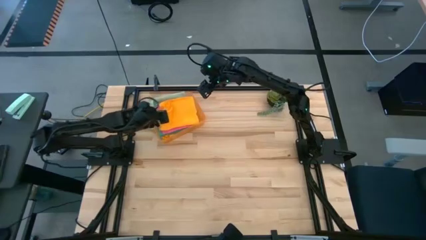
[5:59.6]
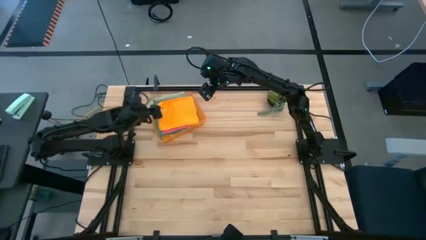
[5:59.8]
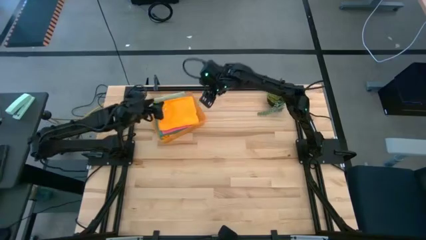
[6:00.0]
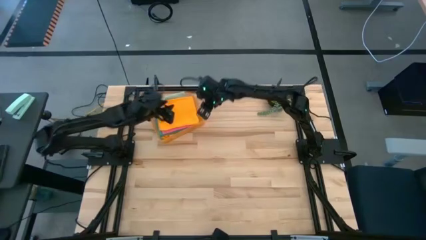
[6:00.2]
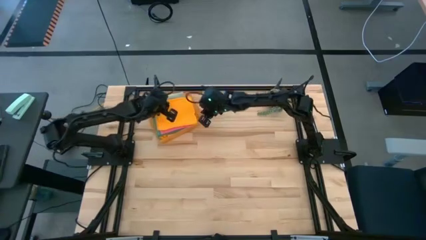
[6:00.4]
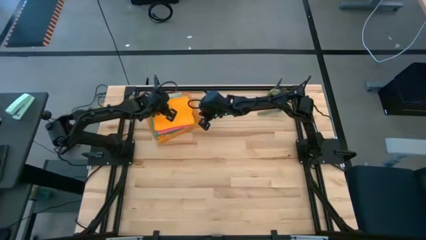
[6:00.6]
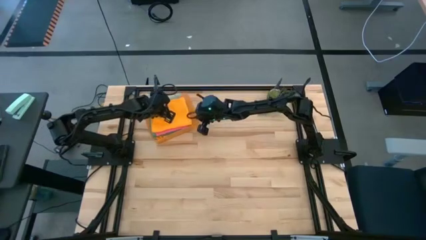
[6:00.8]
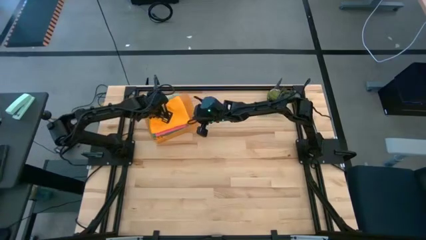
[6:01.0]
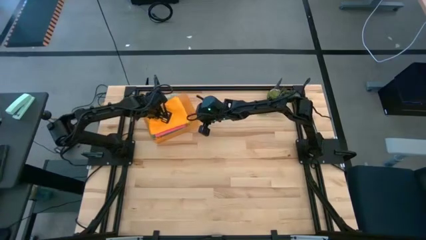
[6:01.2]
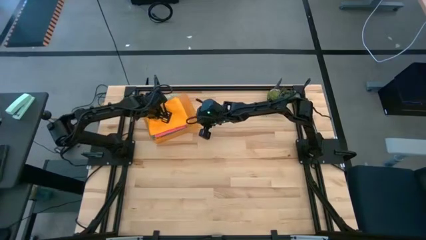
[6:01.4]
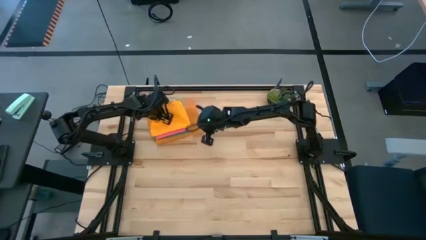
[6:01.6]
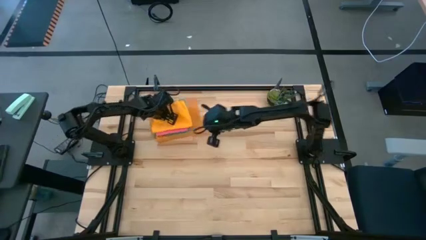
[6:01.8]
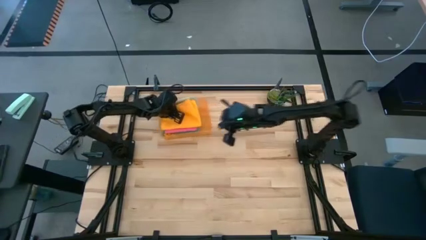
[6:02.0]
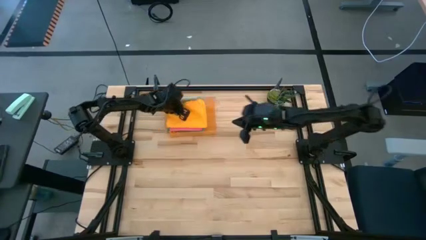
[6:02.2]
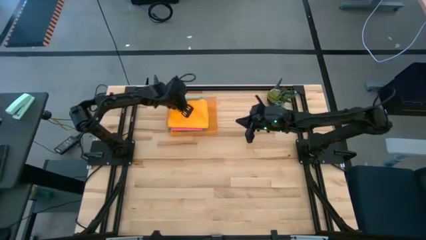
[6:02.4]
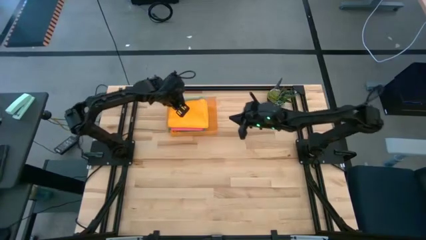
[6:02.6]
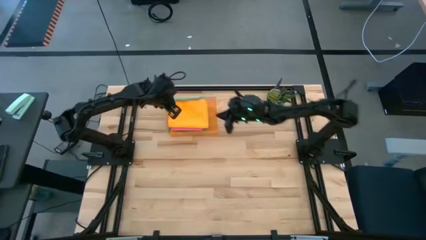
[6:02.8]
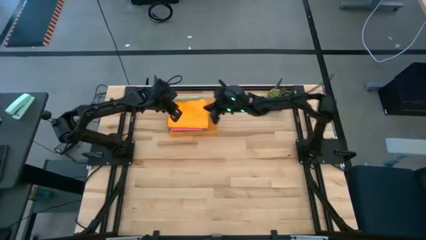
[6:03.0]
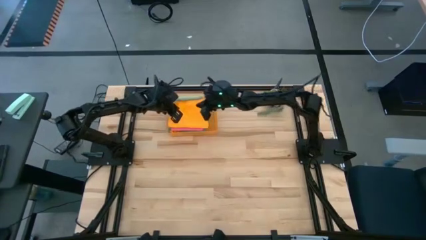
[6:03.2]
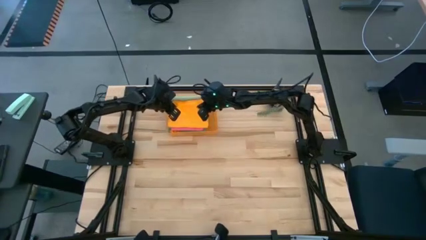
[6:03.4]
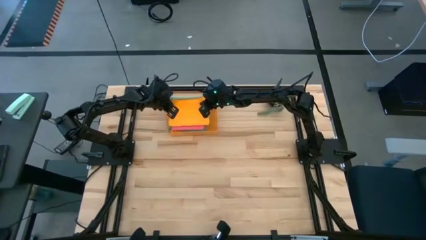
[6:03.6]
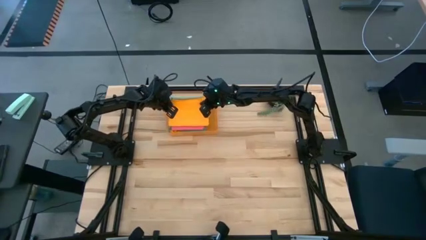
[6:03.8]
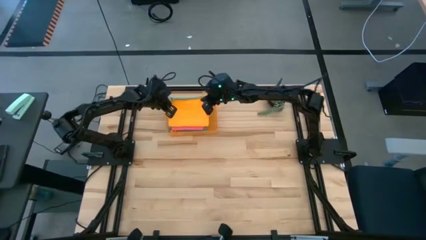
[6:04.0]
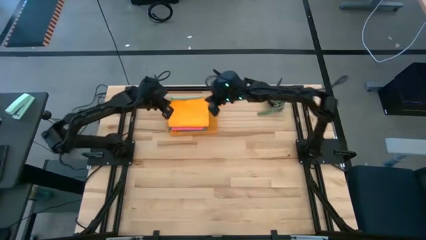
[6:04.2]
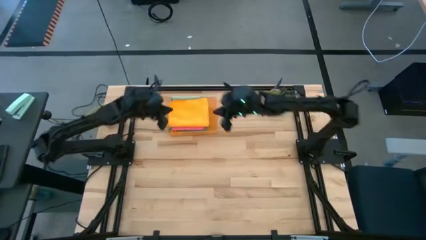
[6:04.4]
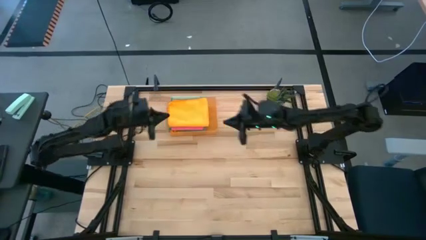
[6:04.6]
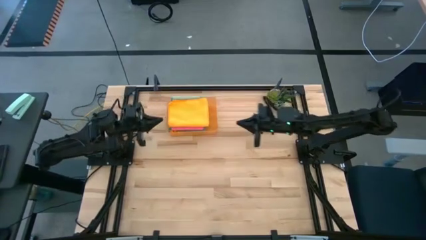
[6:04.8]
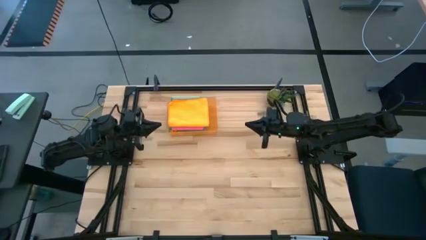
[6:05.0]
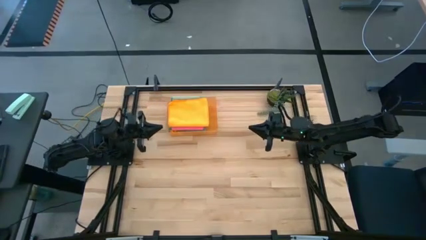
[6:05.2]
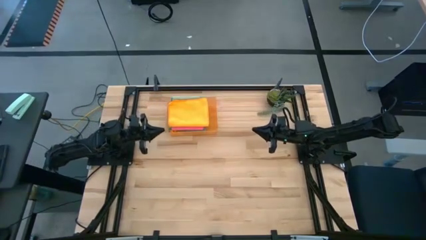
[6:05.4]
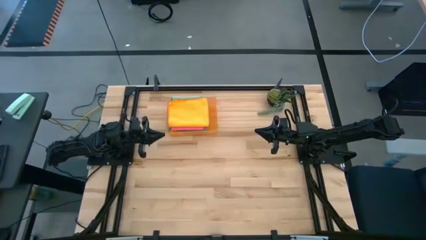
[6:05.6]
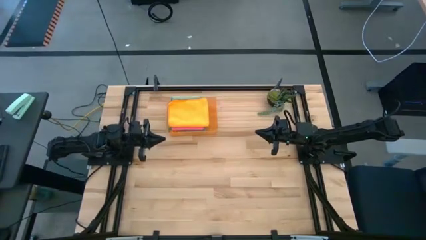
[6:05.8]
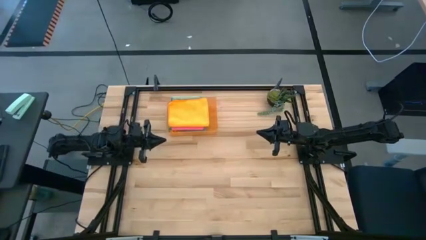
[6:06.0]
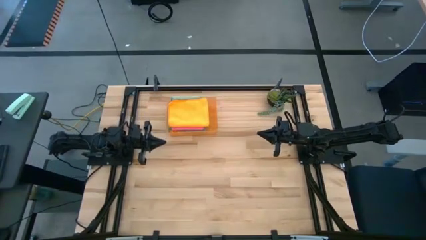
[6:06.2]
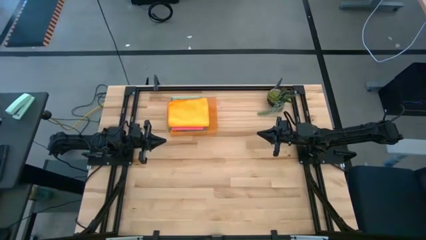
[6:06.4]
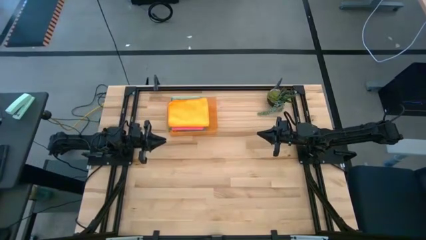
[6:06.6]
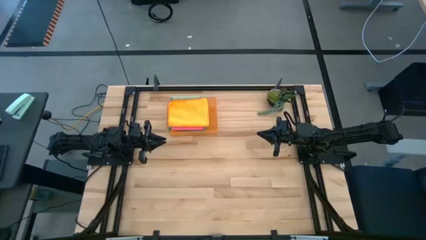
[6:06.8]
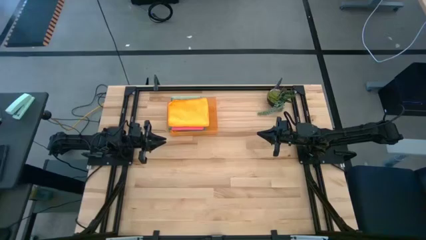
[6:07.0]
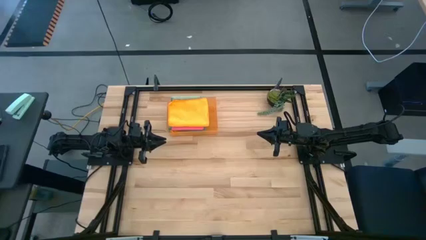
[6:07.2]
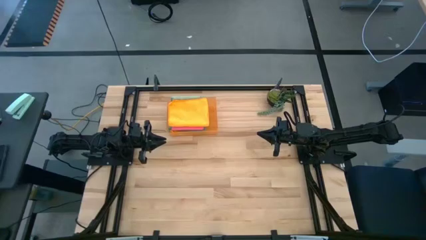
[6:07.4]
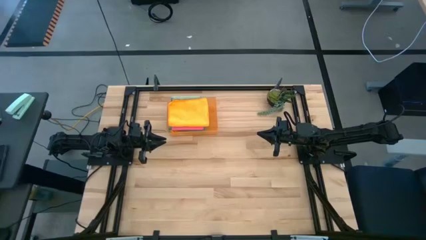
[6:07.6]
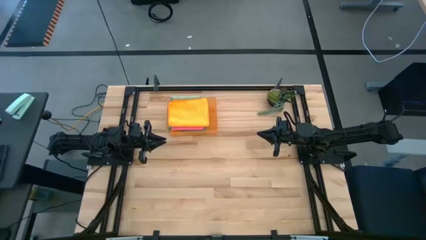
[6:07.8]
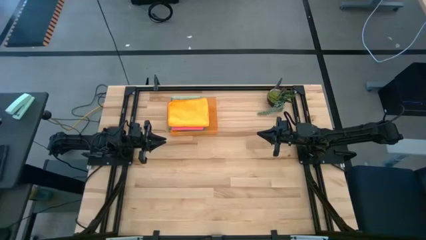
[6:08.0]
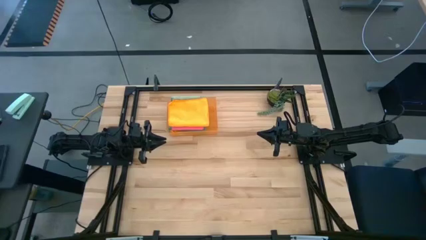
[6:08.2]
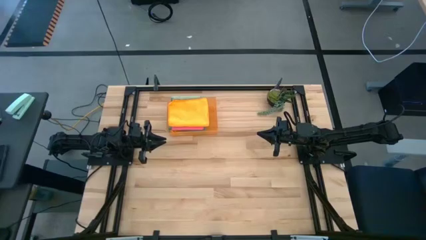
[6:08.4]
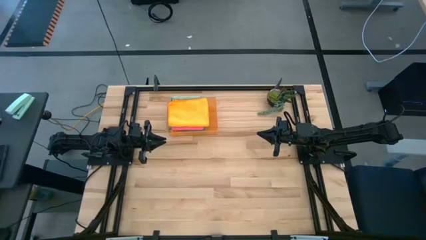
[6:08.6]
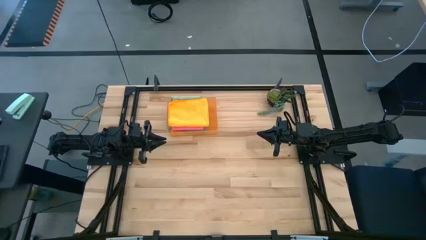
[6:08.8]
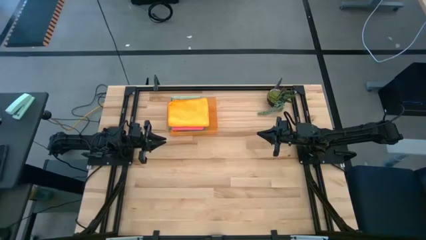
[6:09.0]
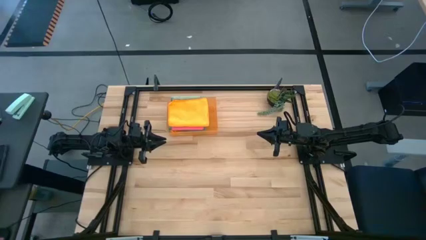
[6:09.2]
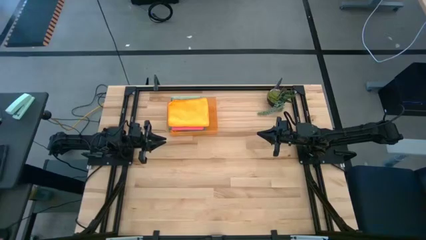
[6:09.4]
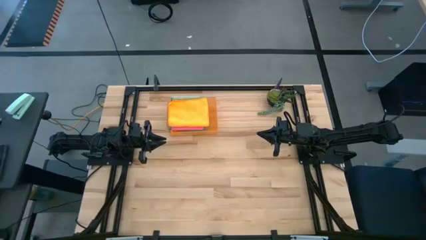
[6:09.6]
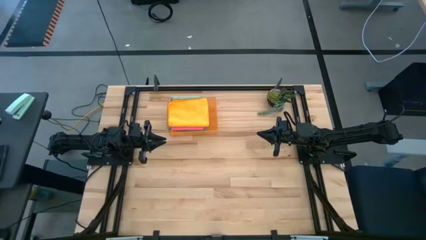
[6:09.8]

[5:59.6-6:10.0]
Task: Fold microfiber towels
Return to Home Position

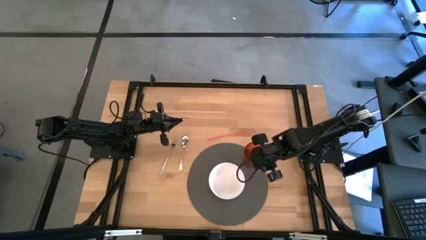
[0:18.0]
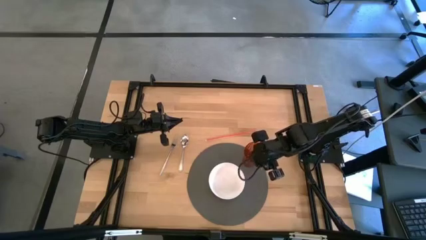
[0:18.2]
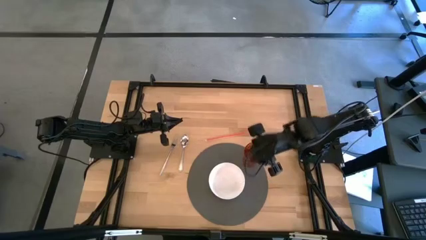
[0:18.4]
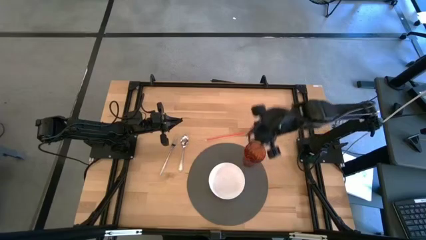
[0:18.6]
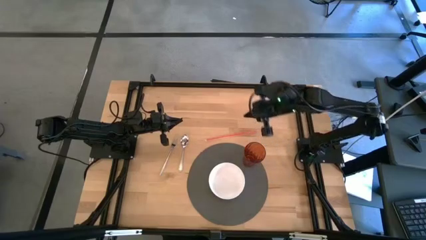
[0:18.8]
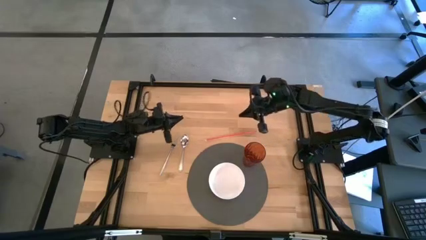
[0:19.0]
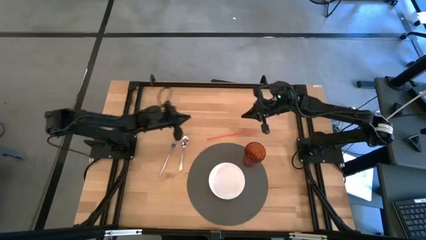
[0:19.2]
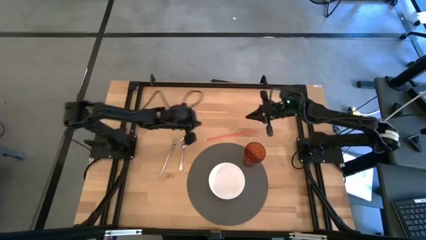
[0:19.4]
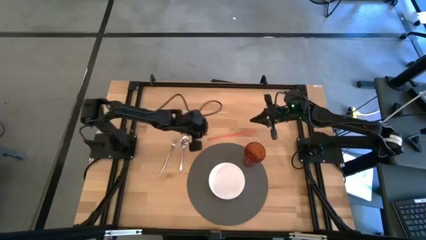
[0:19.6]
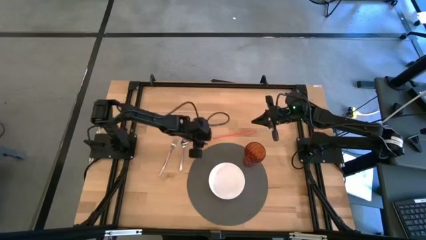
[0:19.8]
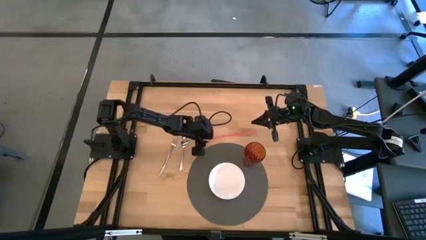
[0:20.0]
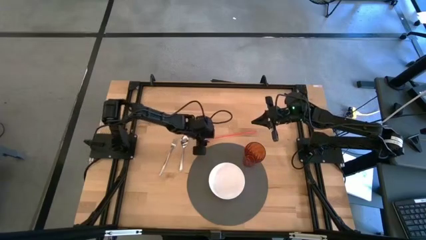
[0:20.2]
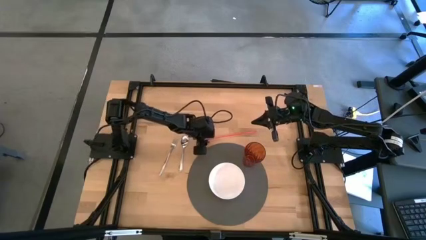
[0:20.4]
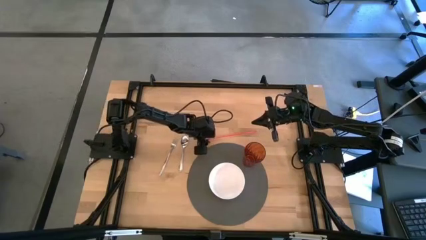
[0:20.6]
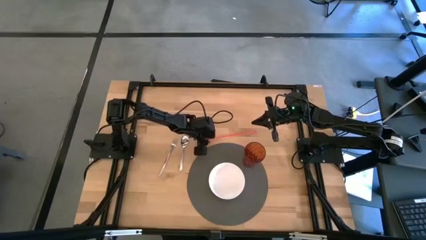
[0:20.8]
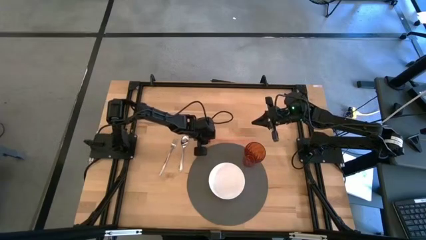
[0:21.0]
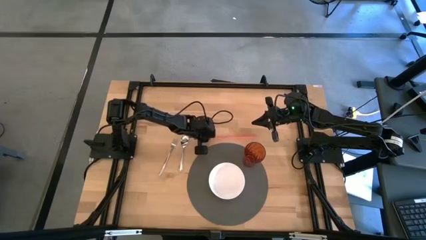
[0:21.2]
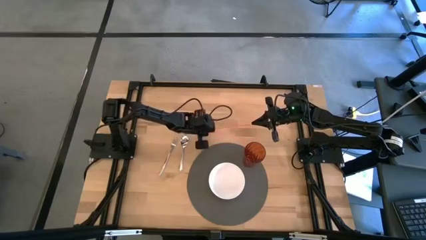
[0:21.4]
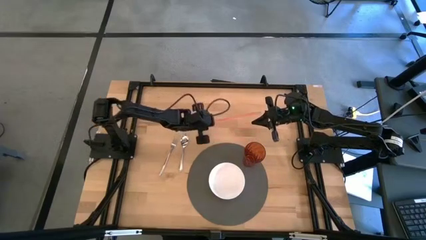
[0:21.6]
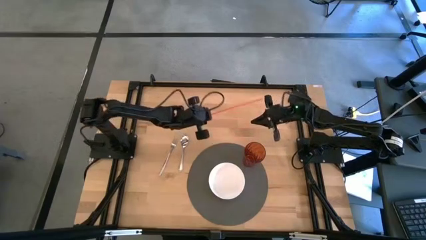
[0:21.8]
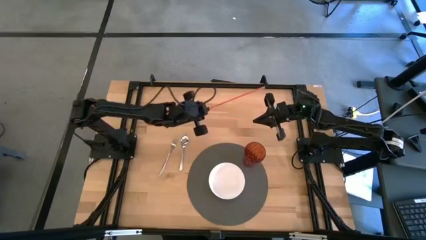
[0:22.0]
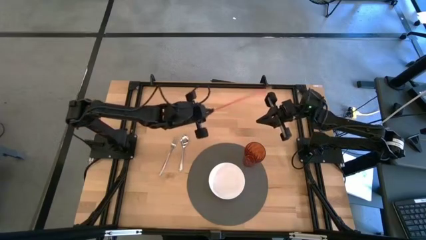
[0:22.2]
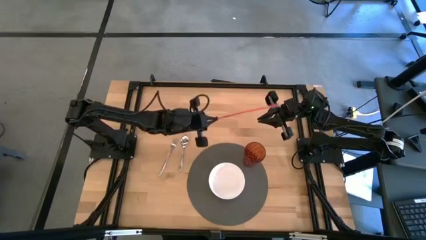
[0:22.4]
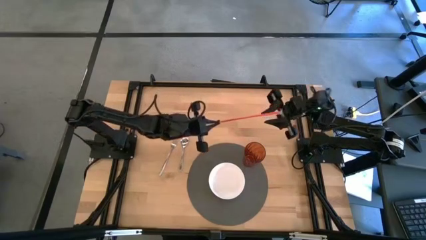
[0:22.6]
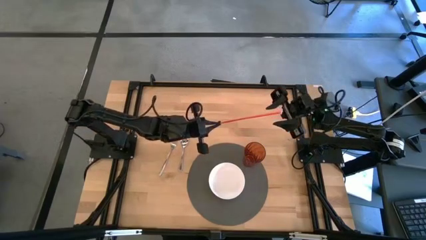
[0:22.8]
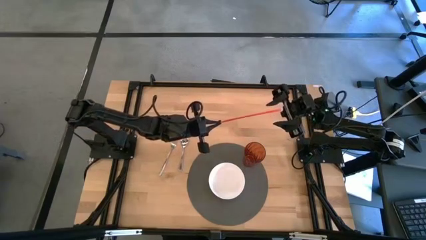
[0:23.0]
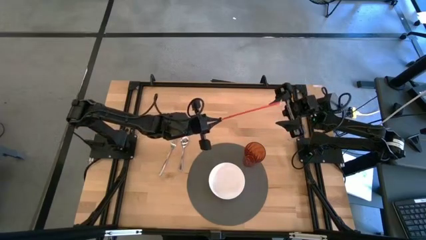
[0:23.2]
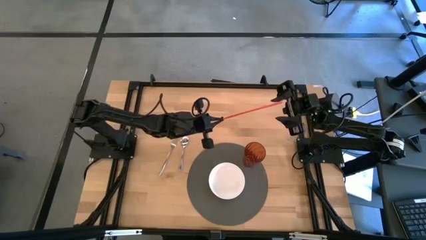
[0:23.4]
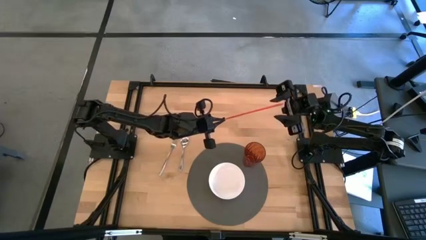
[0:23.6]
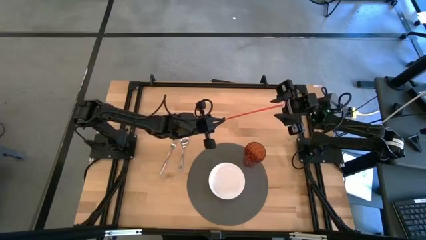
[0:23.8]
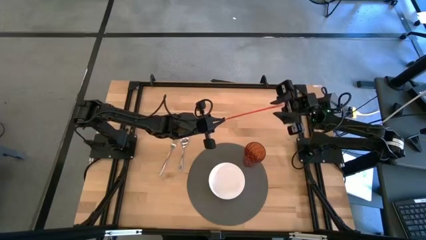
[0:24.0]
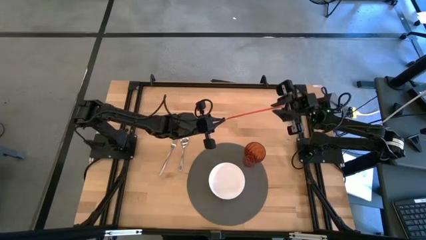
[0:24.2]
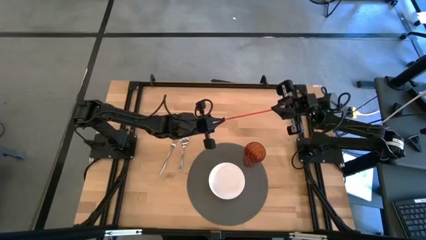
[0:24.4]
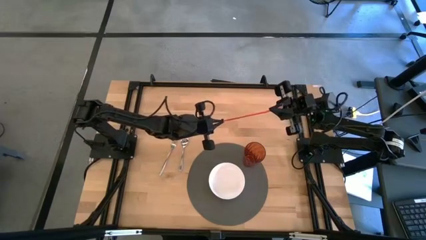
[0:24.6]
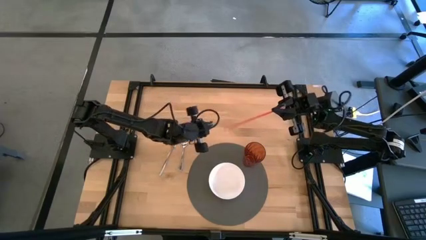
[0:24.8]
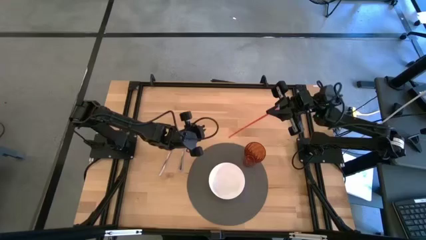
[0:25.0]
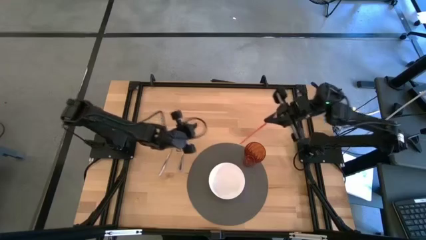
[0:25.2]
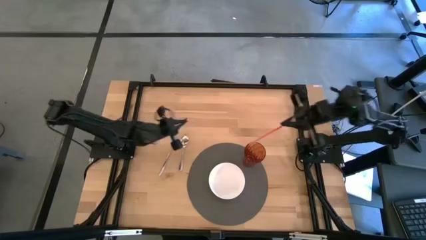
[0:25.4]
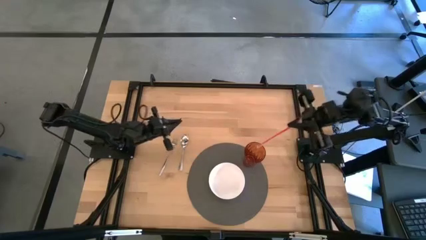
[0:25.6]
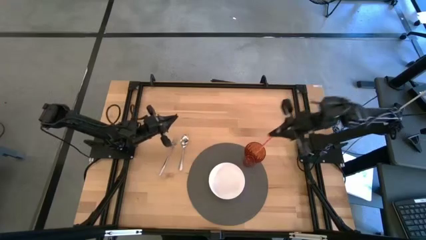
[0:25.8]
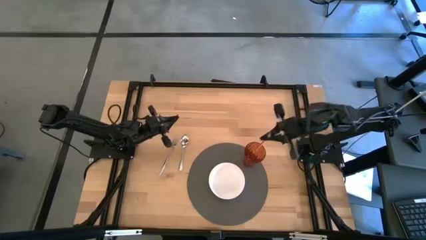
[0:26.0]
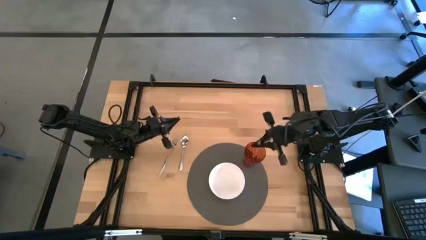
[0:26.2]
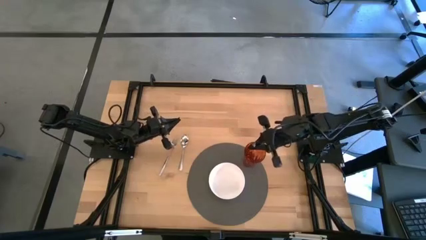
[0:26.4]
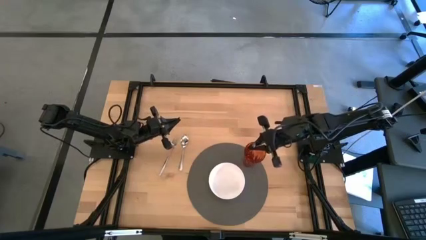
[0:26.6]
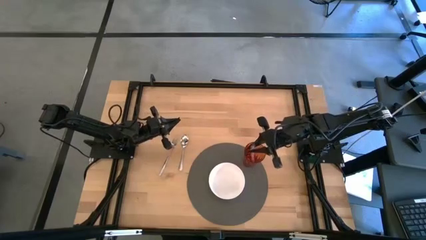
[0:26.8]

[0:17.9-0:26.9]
Task: Pick & Place Utensil
Put the straw into the glass on the table mat
